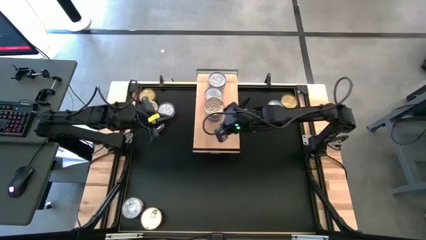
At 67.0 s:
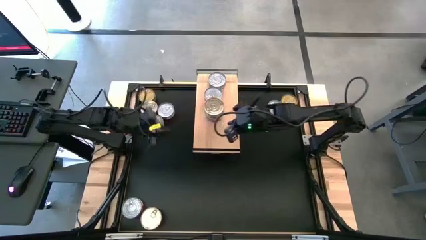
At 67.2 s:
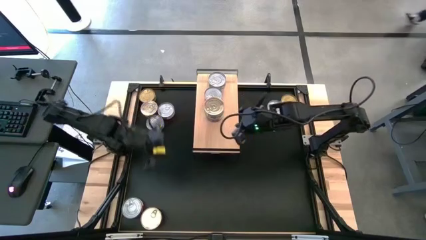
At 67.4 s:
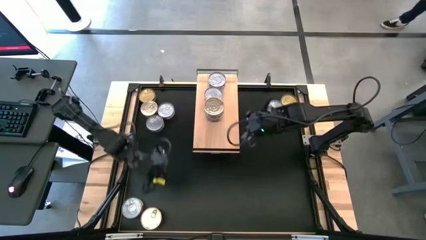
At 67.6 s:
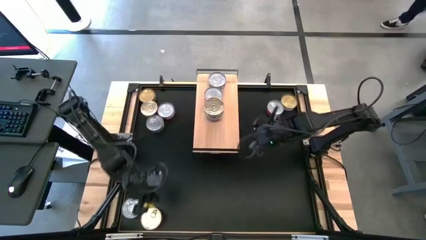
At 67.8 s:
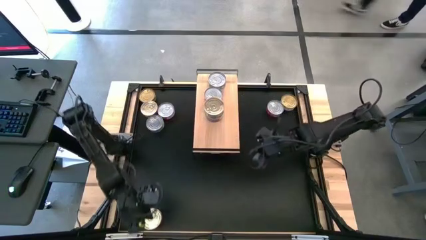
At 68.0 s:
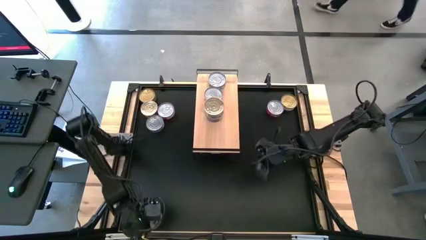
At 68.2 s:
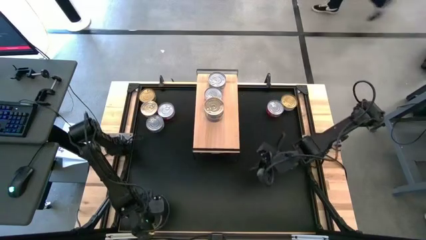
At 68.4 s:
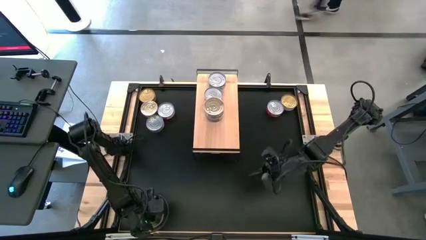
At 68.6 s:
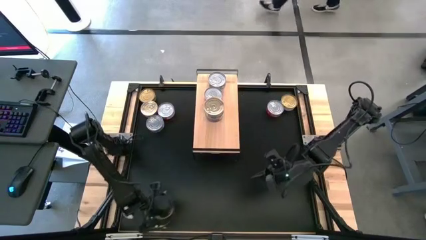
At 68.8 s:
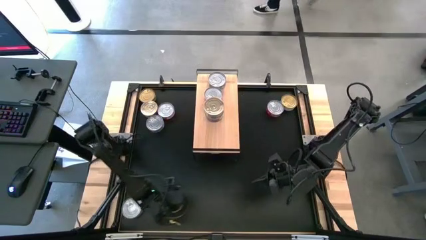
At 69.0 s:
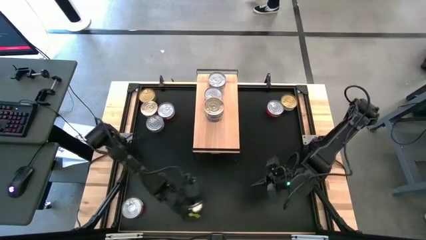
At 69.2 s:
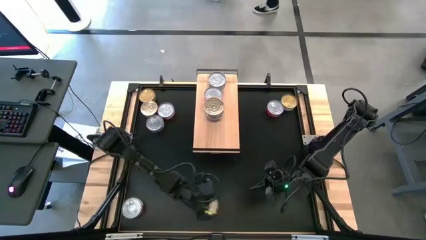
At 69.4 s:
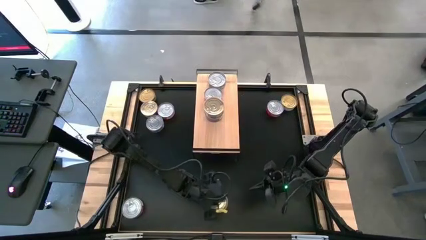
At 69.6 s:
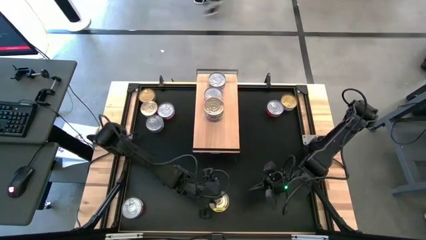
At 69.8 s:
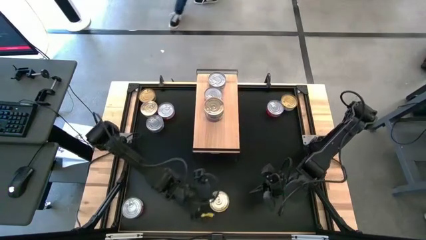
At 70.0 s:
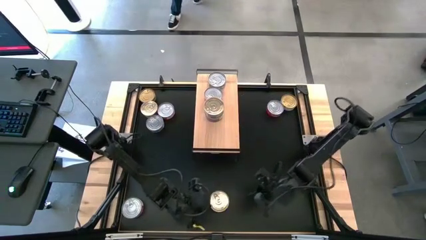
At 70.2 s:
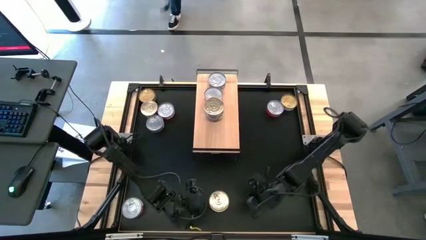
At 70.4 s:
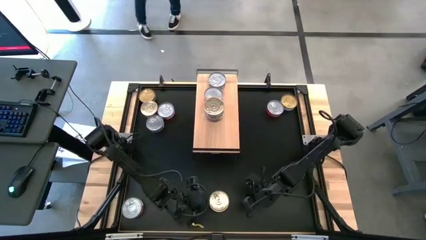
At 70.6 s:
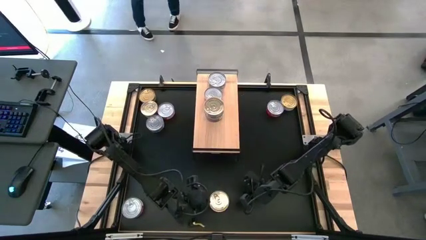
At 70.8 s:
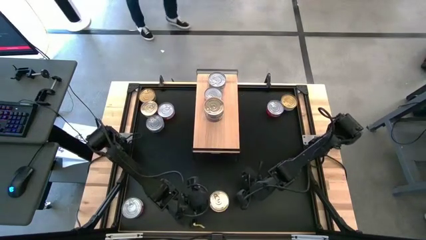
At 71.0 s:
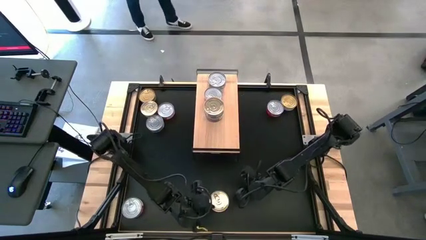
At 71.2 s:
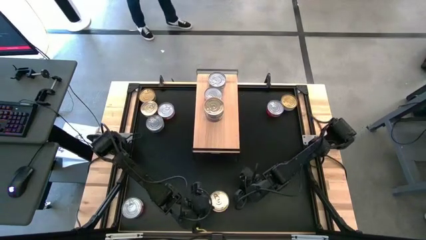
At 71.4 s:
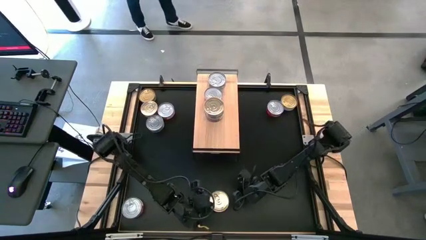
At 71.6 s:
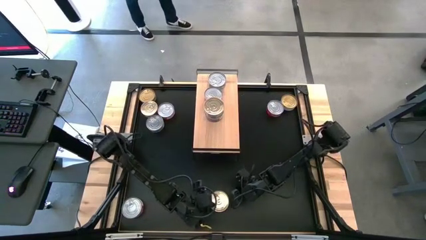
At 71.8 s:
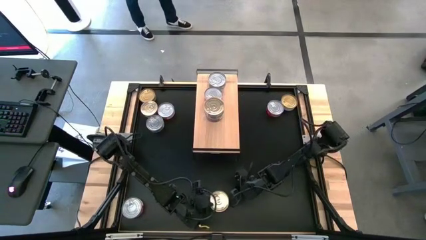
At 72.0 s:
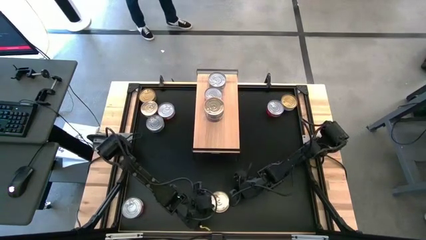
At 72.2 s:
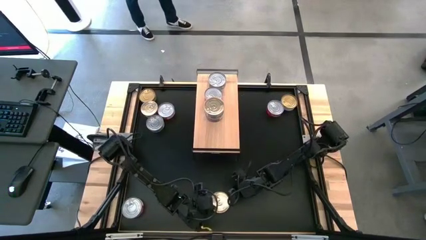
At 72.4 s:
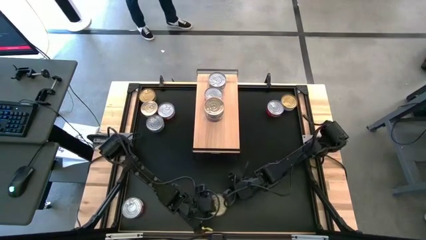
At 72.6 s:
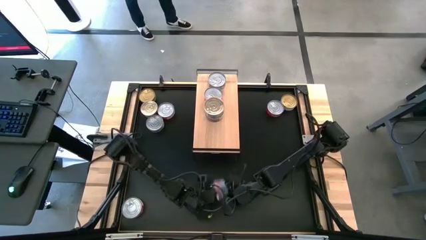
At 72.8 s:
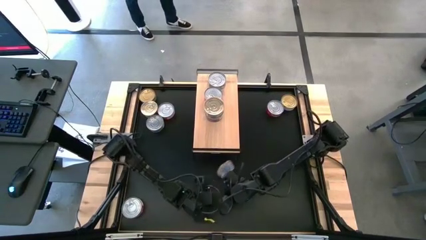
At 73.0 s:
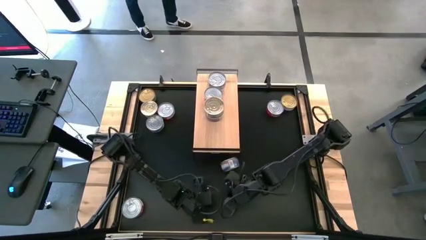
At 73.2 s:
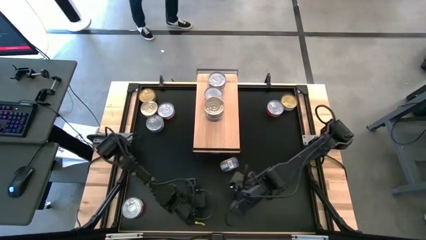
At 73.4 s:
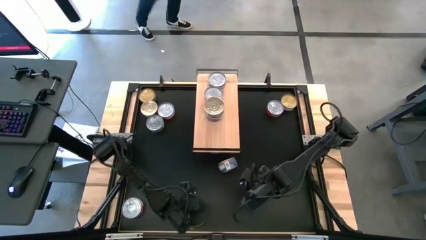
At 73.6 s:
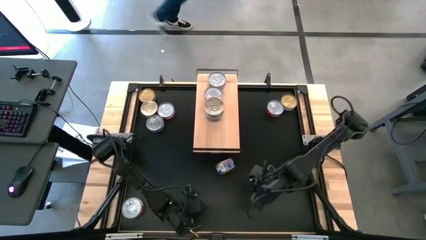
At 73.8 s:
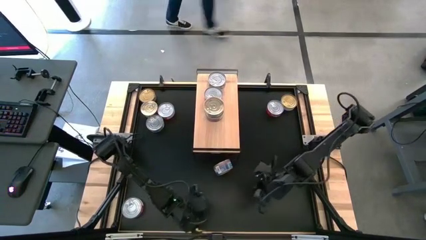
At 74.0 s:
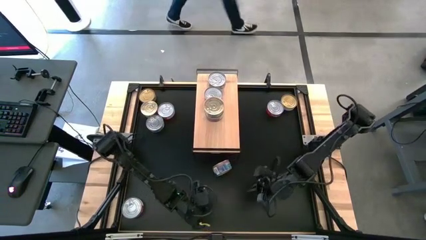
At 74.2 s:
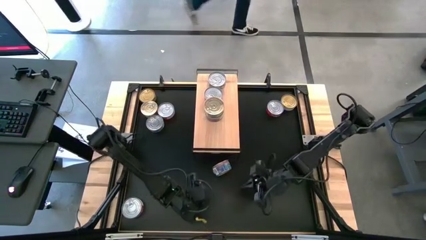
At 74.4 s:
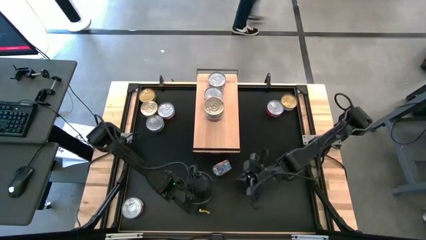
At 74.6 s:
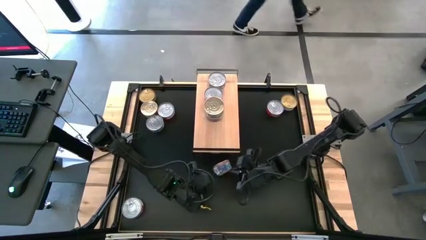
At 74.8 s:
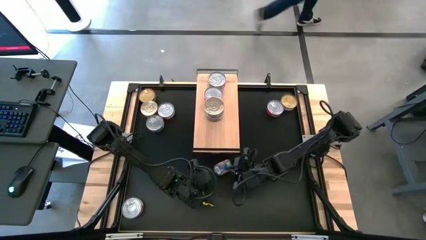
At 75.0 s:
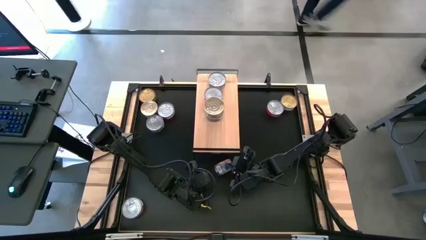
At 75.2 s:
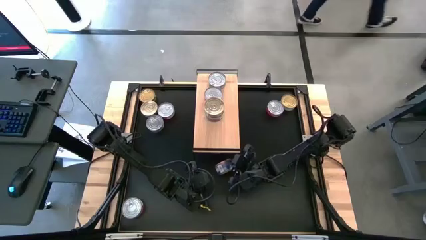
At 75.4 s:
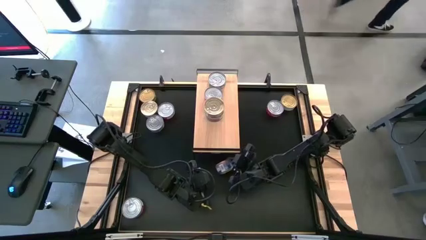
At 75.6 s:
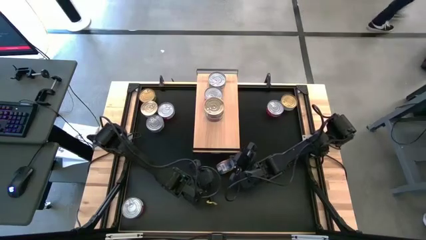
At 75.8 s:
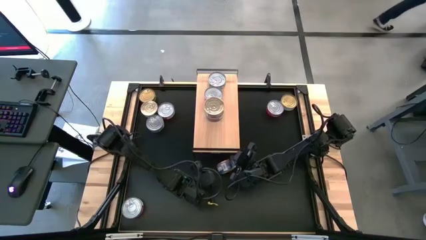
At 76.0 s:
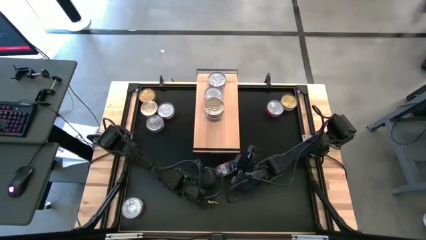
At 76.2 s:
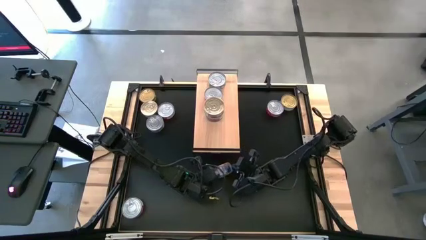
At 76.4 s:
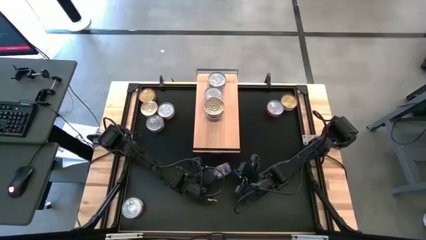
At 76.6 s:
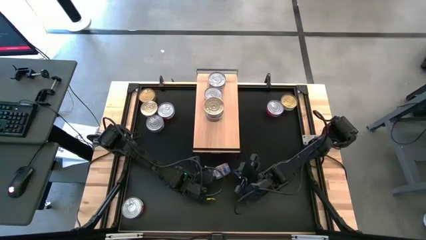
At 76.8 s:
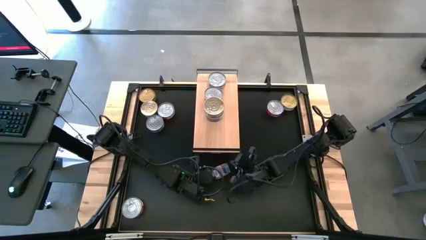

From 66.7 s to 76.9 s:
Task: Stack canned seafood by type on shelf
Stack the blue pink tuna can on top of the blue pink tuna can on the shelf

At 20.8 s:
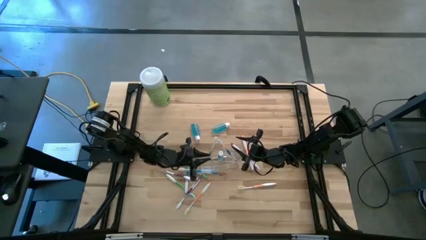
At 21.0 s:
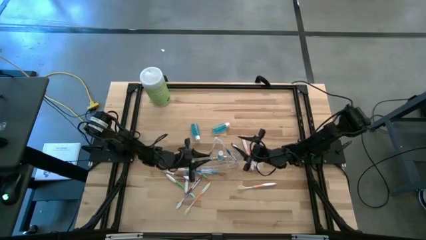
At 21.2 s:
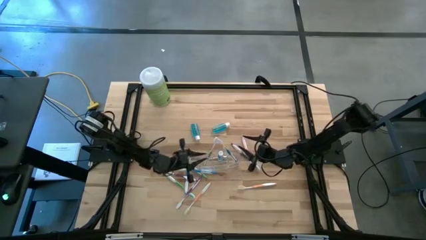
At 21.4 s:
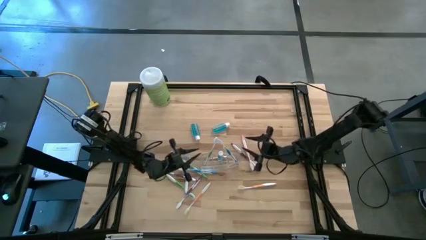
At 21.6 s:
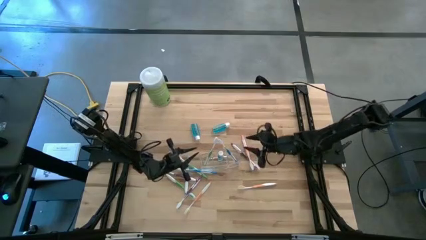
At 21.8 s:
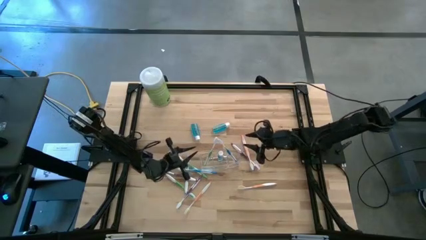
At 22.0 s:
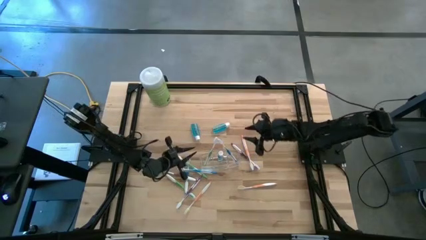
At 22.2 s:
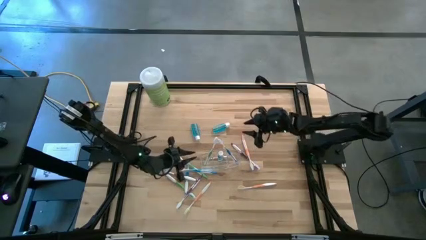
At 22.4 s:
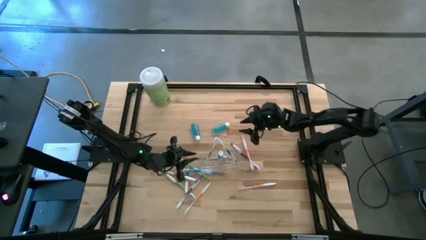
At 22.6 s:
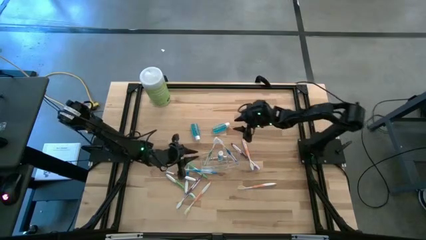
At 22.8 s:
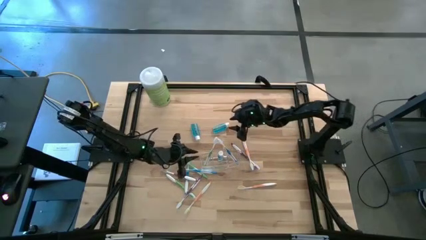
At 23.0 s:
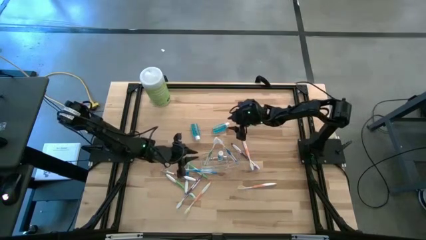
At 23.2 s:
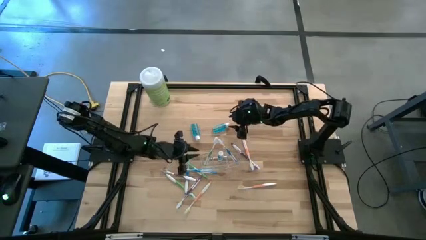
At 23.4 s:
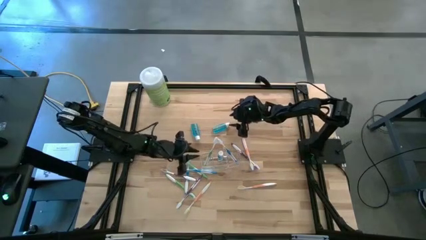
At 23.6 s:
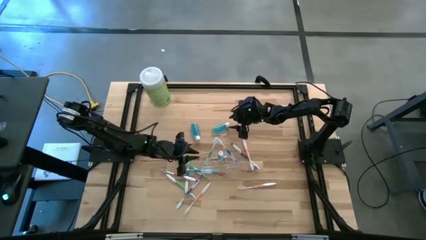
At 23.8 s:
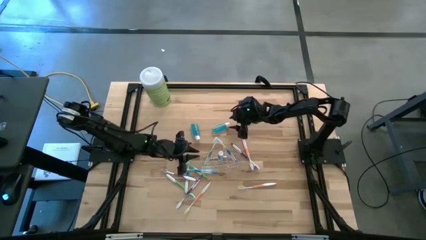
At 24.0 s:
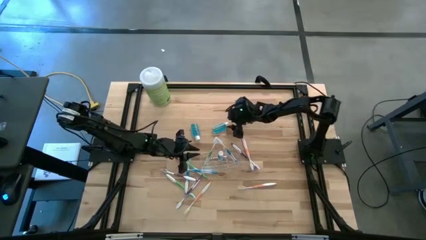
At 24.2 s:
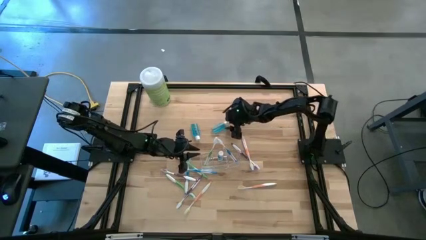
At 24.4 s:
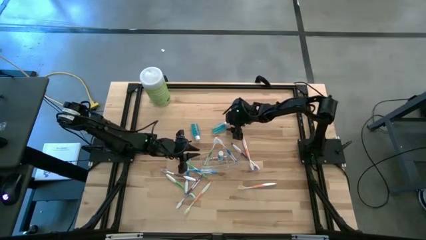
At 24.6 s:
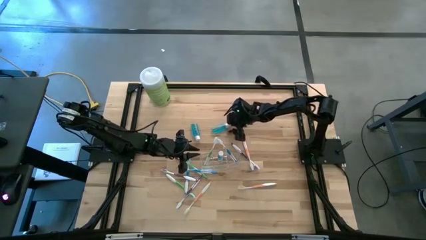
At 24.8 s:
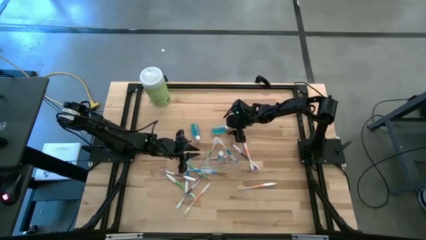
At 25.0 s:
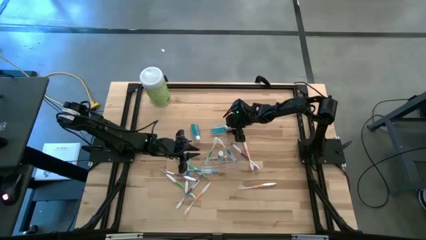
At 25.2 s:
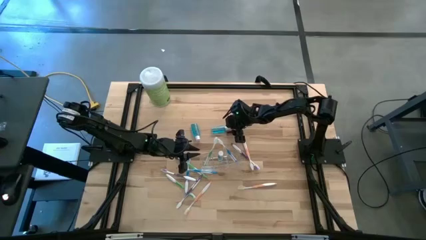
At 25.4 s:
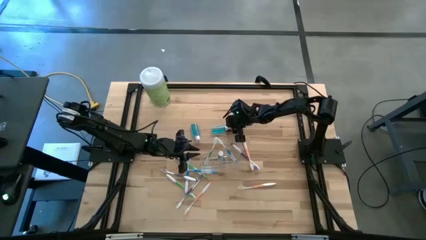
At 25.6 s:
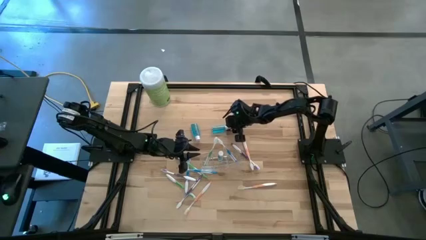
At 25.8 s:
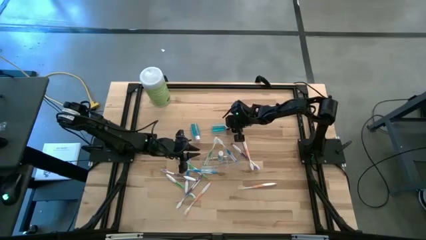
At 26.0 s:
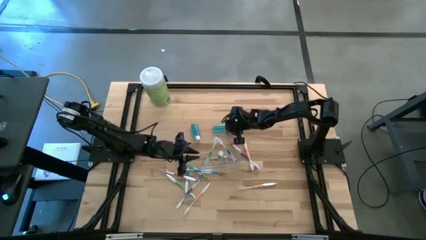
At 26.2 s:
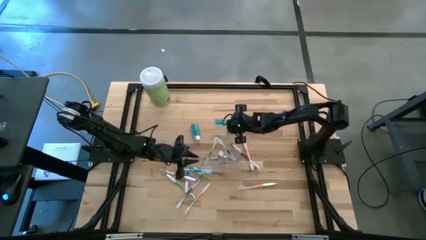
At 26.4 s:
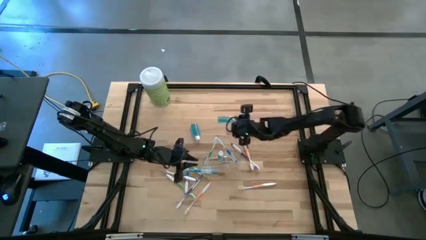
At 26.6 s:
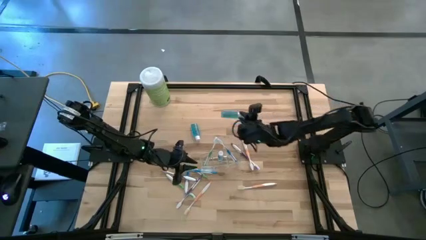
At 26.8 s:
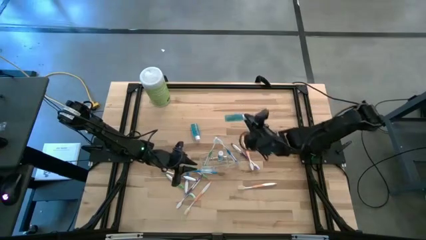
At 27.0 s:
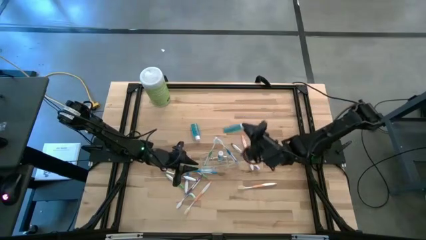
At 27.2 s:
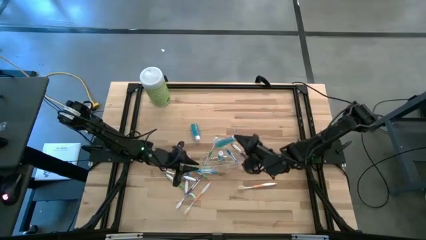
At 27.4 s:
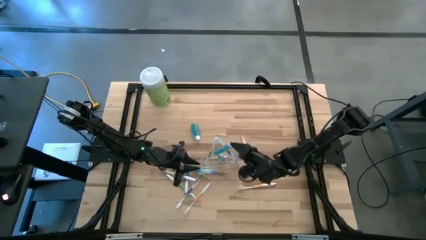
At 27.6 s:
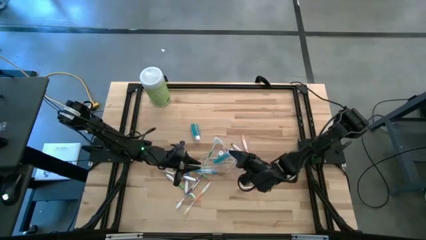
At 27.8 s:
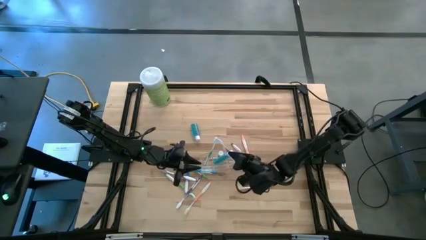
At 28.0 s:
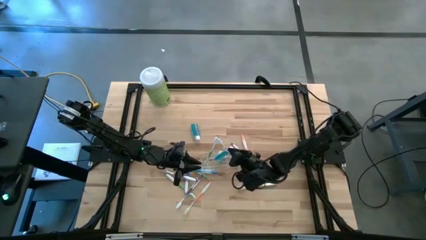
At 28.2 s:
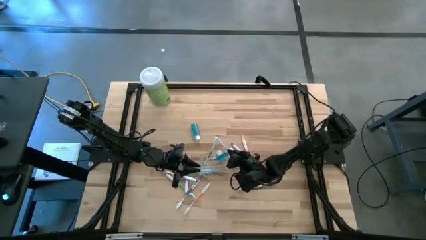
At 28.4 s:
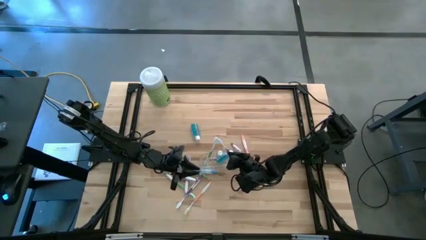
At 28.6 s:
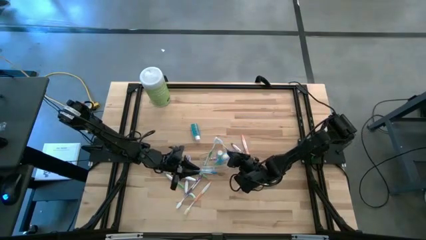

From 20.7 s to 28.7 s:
Task: Pick & Place toothbrushing station
Put the right mouthwash into the transparent organizer
